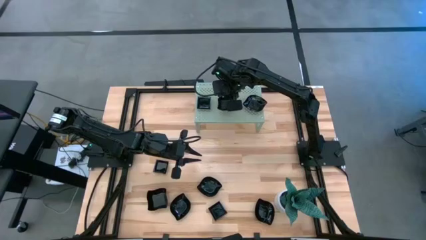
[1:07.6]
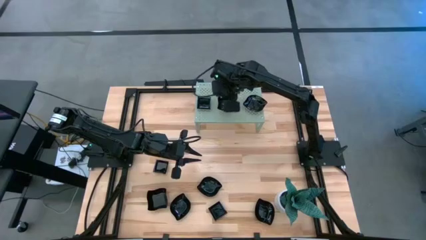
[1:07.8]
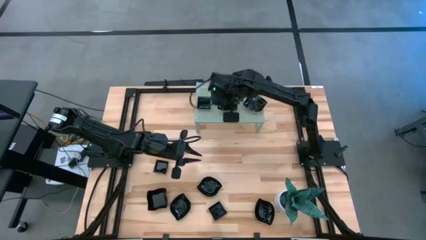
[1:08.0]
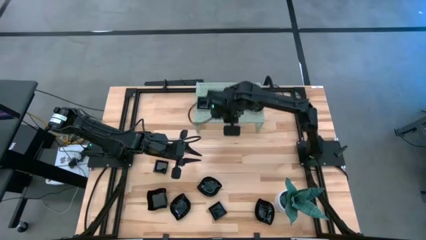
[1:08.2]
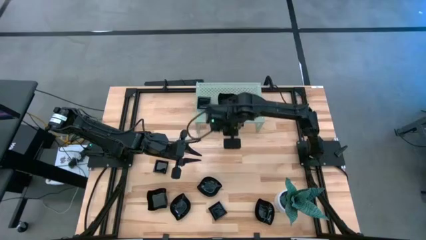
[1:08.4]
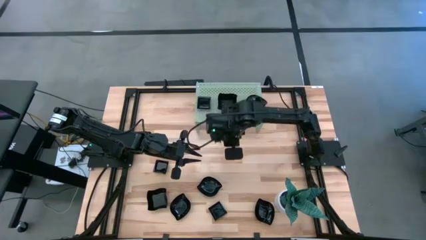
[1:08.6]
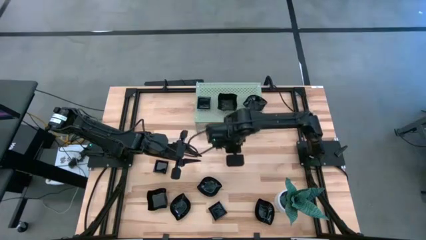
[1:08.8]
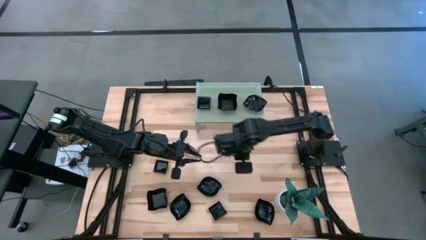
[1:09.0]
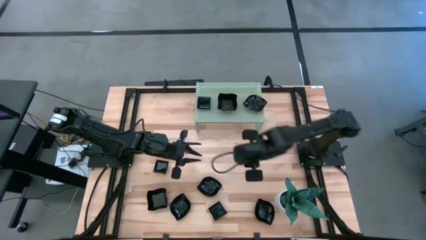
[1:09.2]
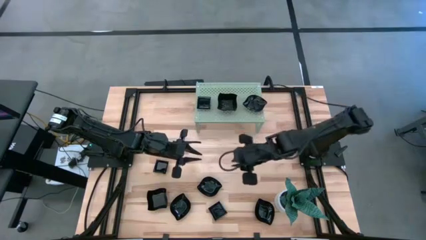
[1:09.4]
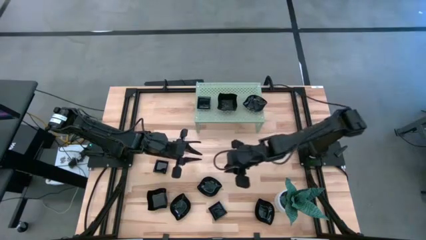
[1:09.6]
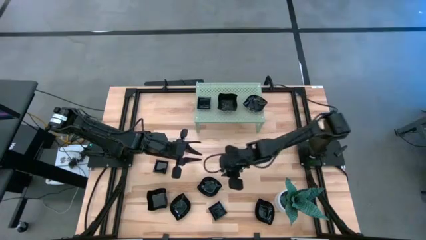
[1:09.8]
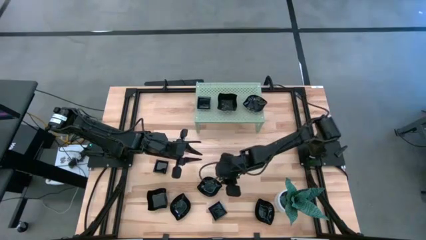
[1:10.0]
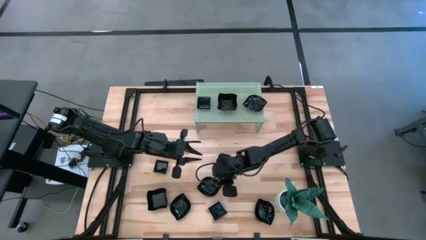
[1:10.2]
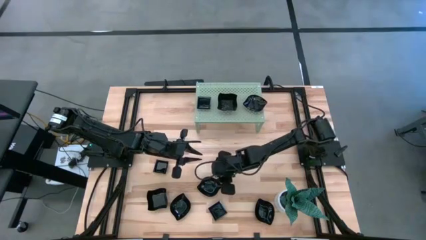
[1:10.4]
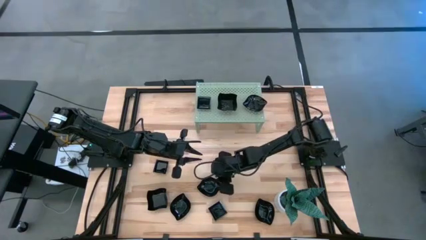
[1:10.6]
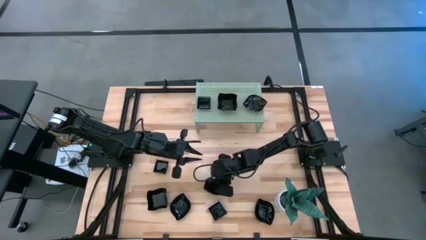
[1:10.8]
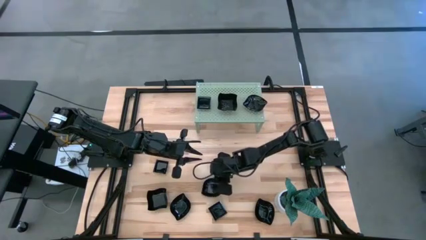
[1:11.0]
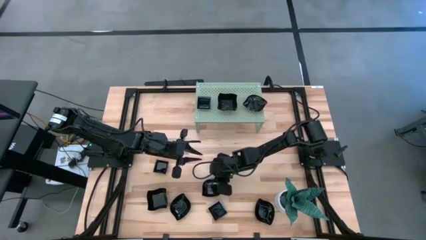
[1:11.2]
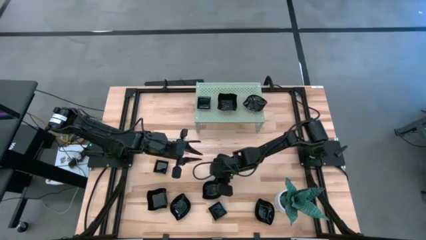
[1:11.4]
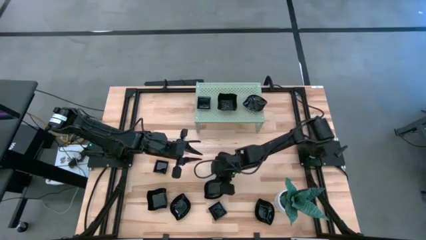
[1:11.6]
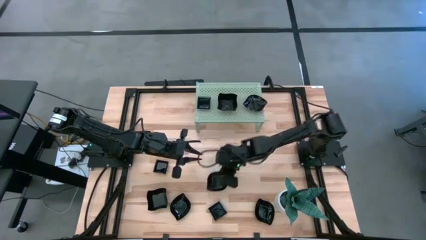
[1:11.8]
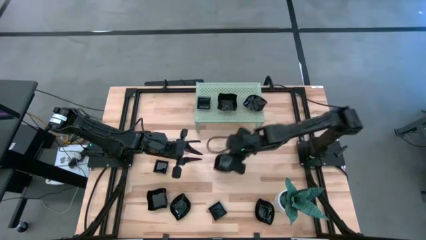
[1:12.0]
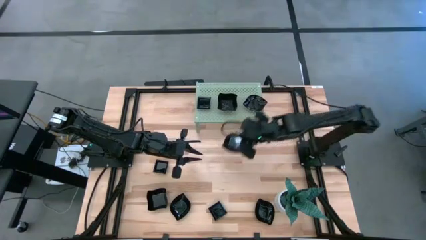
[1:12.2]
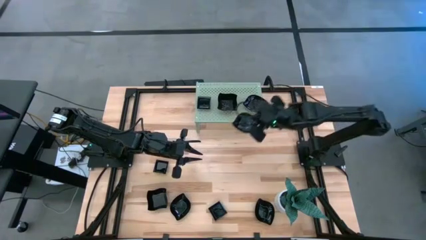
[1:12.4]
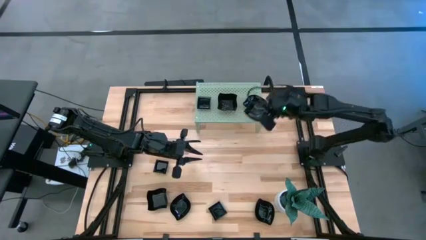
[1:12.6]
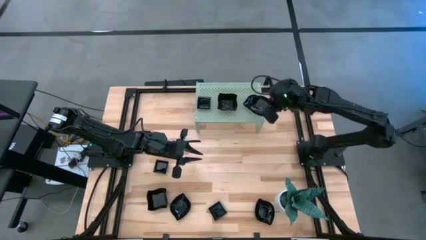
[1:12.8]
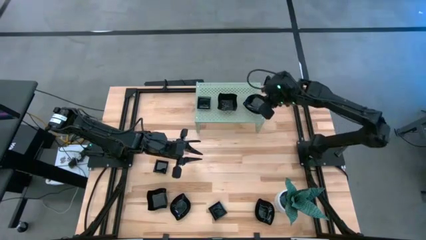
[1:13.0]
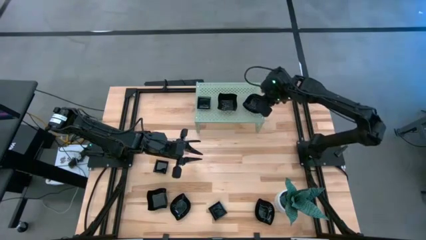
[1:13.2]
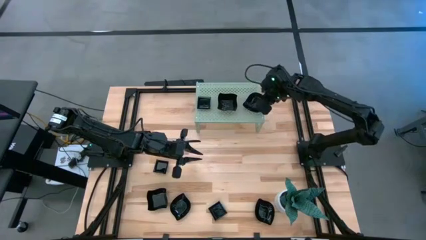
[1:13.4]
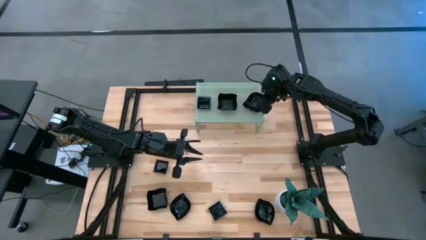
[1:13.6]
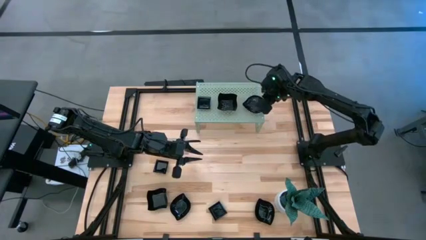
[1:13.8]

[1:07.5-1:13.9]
Task: Pick & Place Mini shaped plates
Stack the leaf shaped plate on top of the other leaf shaped plate on the shelf

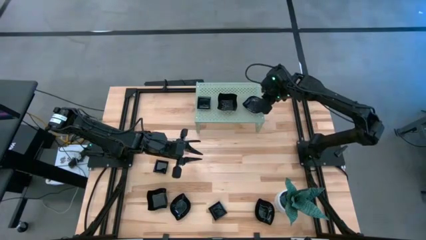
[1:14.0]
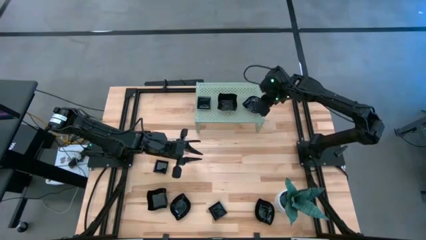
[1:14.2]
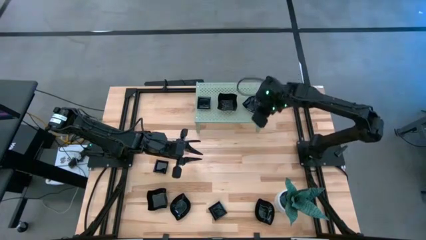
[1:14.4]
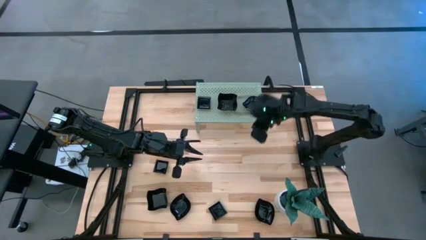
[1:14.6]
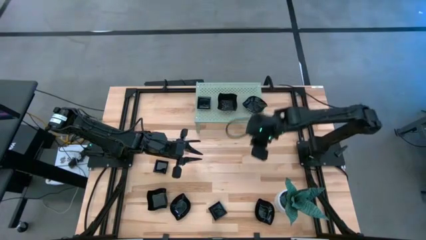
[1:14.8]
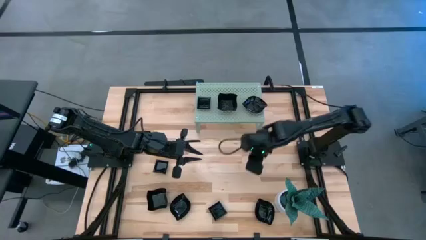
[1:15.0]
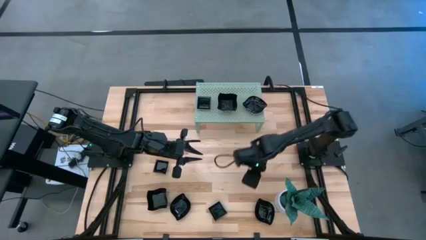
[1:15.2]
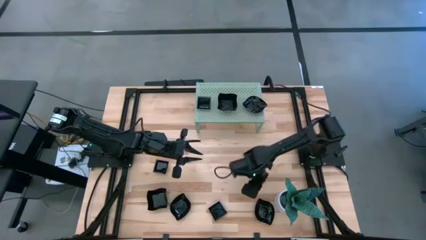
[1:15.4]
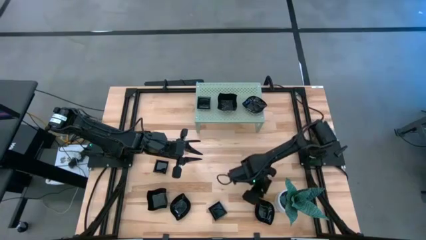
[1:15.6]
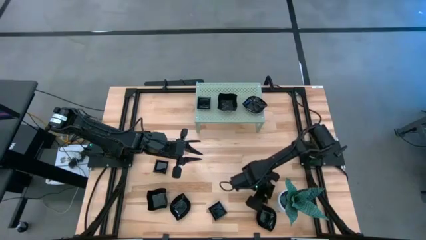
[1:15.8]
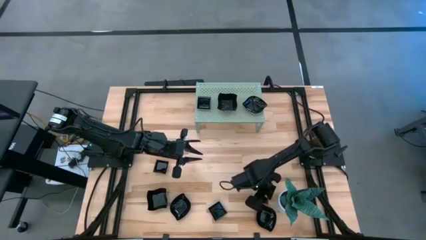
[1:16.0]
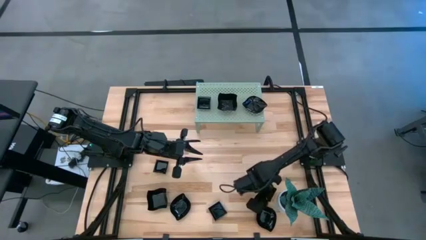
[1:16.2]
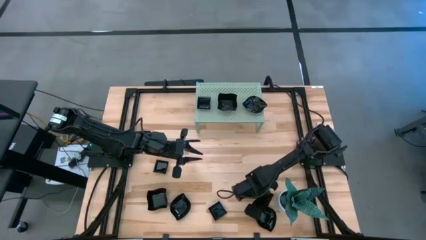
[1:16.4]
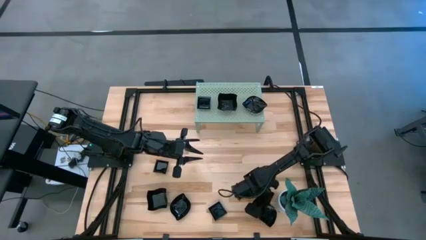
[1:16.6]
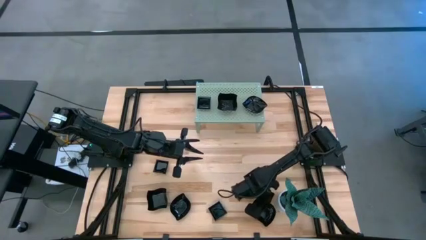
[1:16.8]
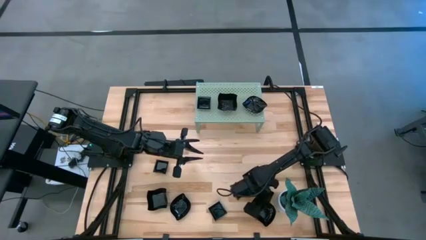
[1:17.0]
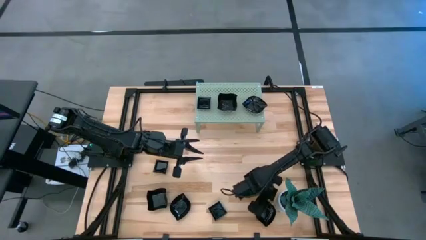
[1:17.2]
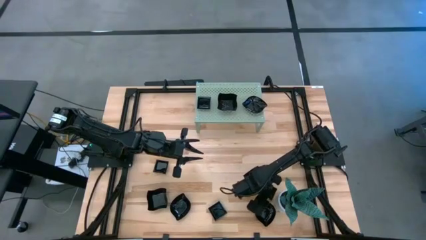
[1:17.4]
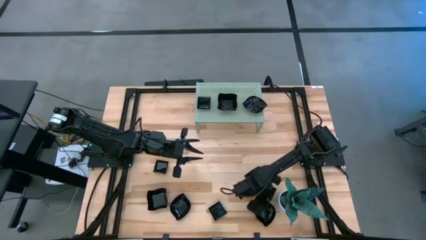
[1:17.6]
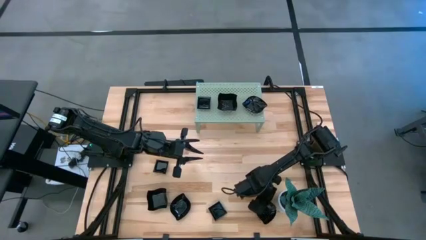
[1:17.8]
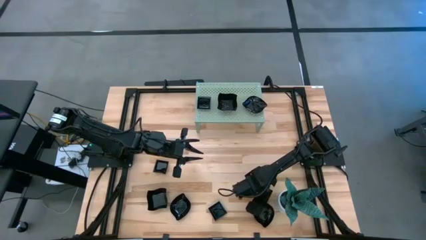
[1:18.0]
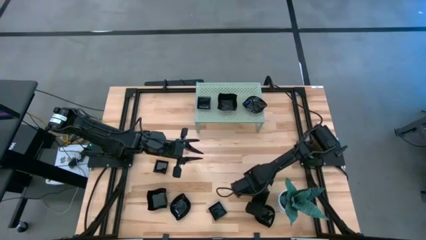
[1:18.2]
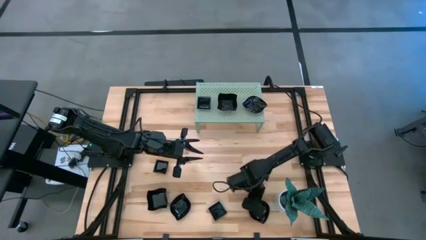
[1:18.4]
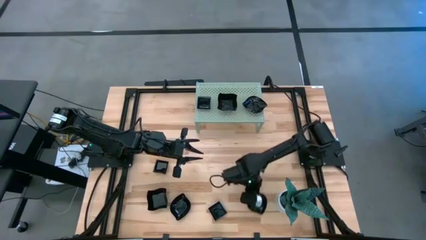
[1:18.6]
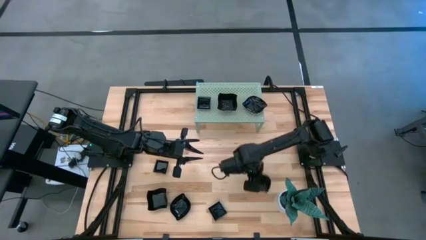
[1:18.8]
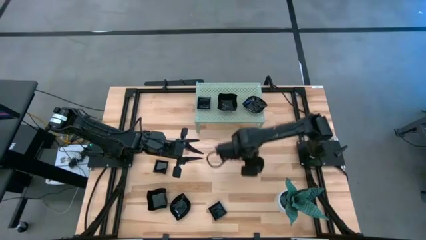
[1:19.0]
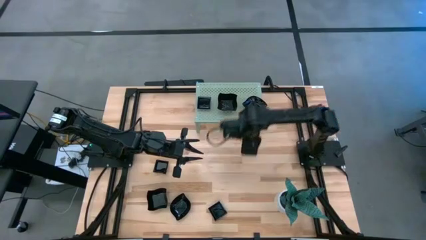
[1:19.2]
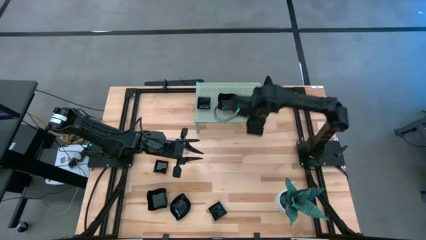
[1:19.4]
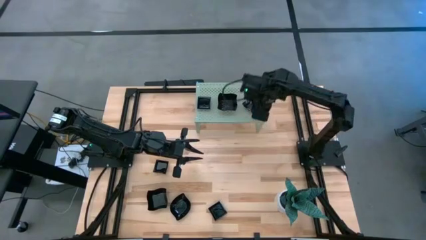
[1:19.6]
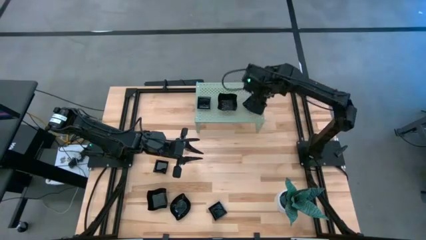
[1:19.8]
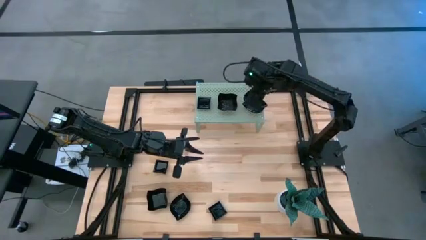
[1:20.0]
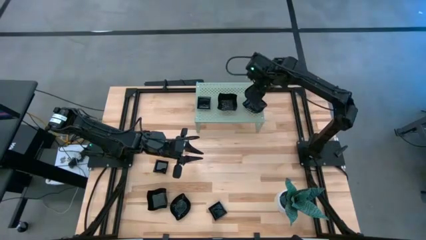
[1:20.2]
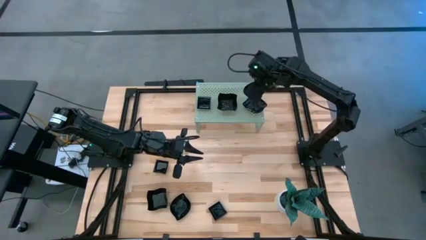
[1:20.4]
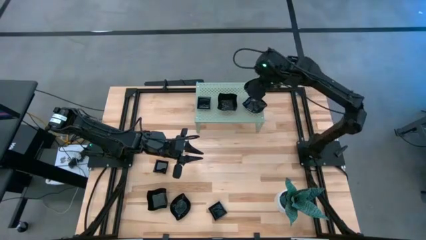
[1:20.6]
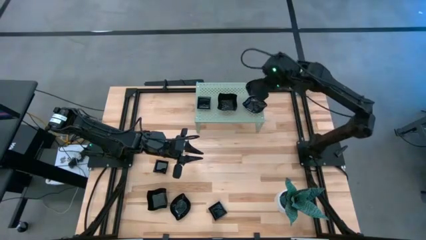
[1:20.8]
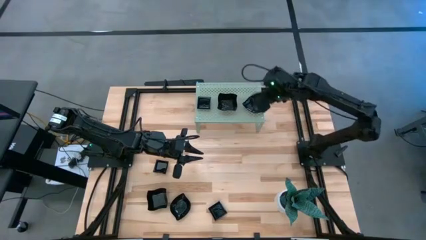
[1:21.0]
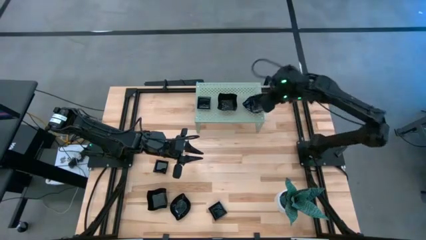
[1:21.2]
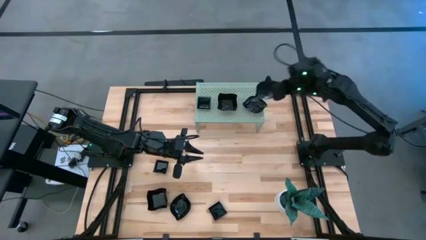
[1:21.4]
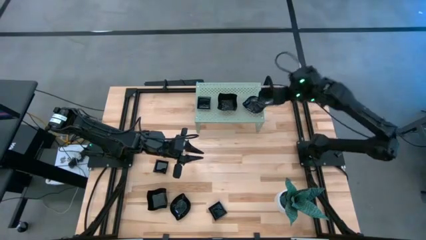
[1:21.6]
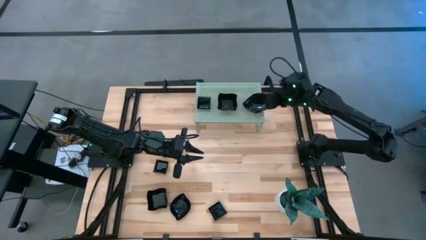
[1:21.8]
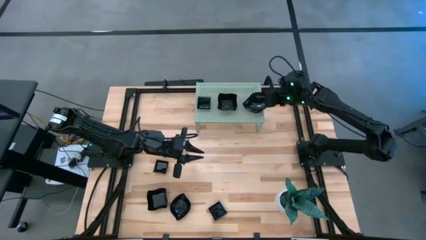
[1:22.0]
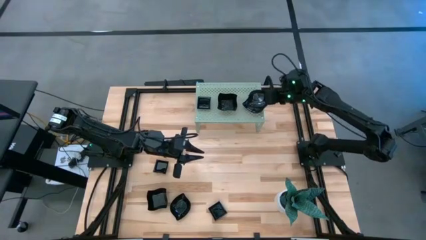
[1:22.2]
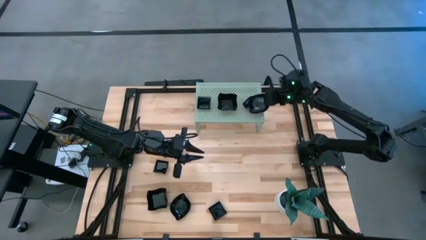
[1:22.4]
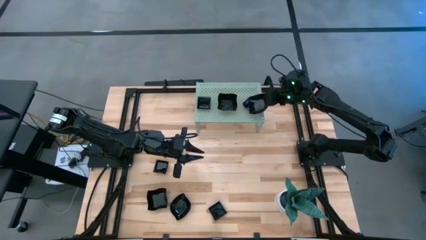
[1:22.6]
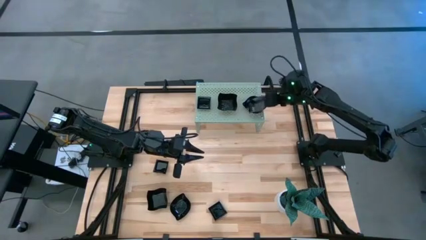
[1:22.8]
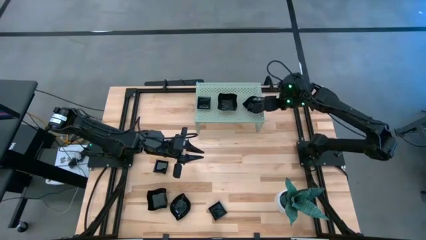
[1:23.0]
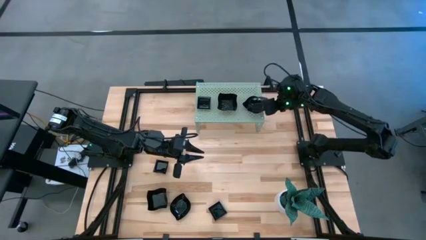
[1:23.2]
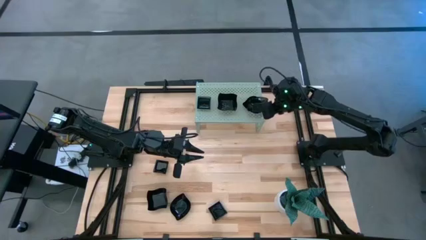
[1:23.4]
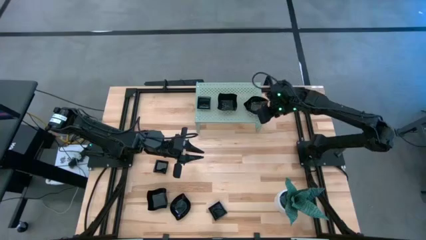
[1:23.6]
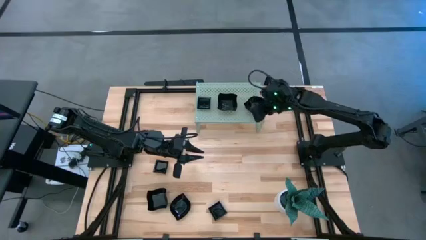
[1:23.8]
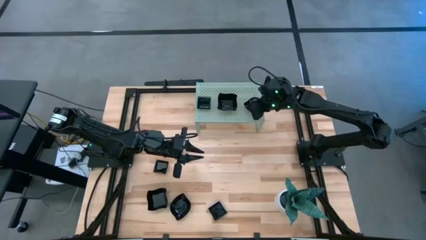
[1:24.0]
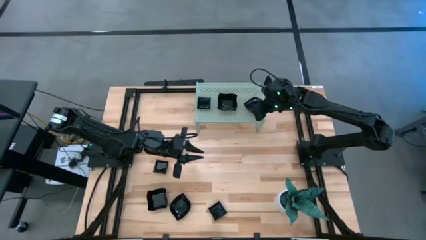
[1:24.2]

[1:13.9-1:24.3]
Stack the leaf shaped plate on top of the other leaf shaped plate on the shelf
